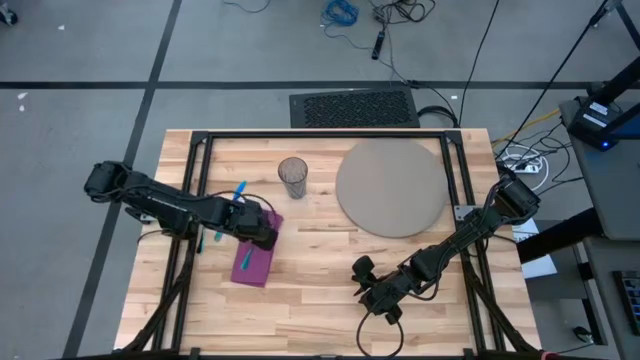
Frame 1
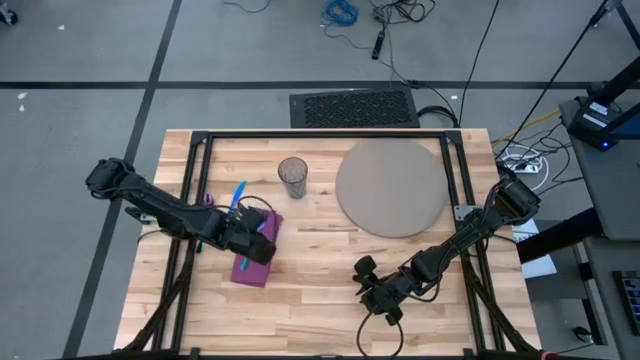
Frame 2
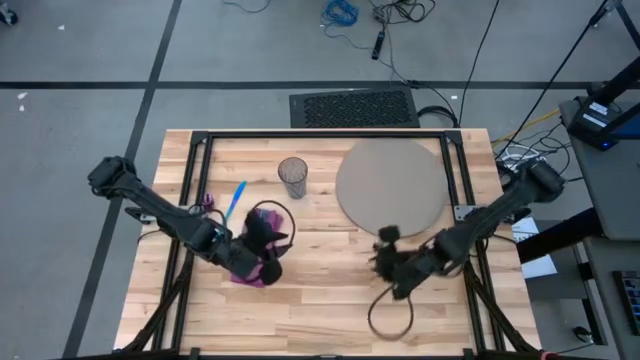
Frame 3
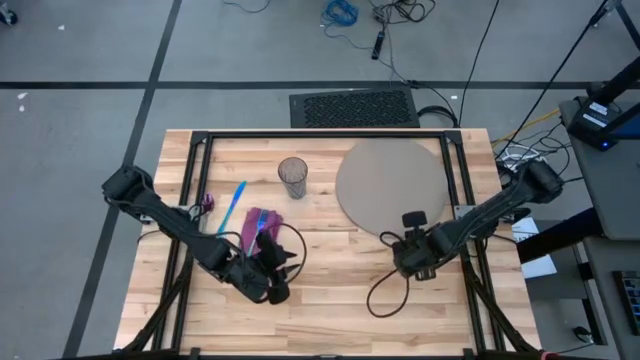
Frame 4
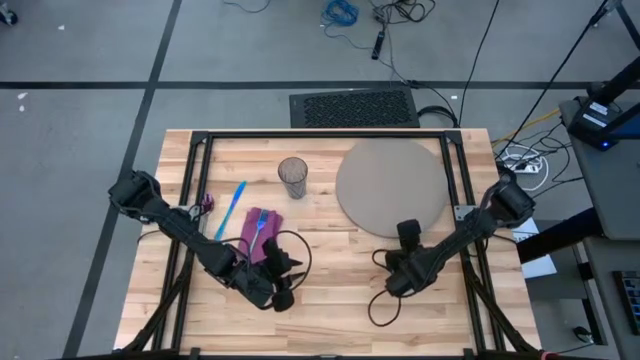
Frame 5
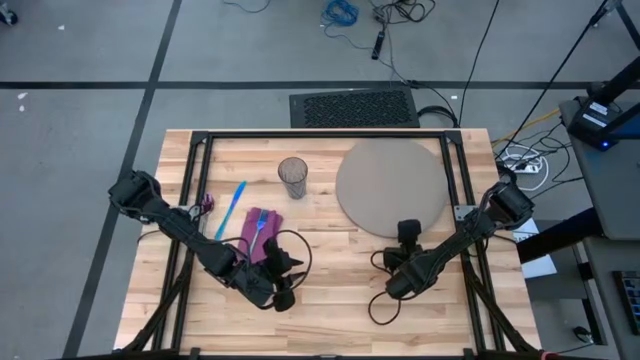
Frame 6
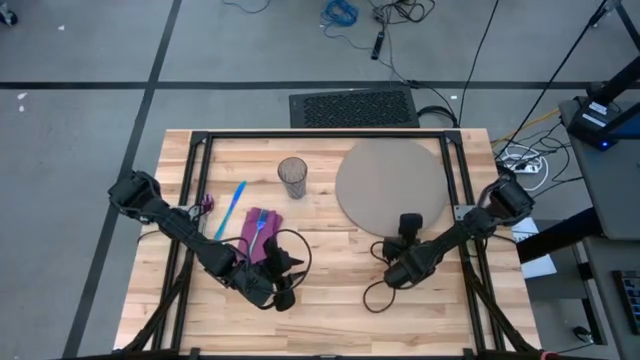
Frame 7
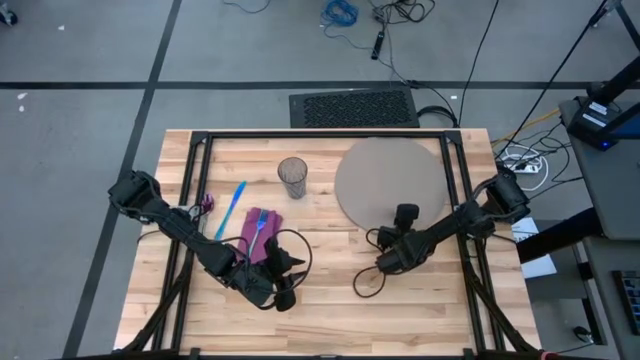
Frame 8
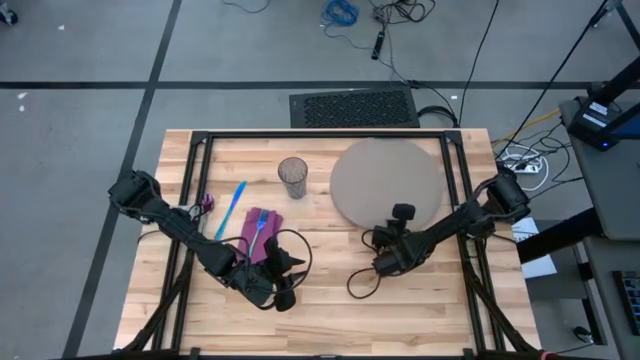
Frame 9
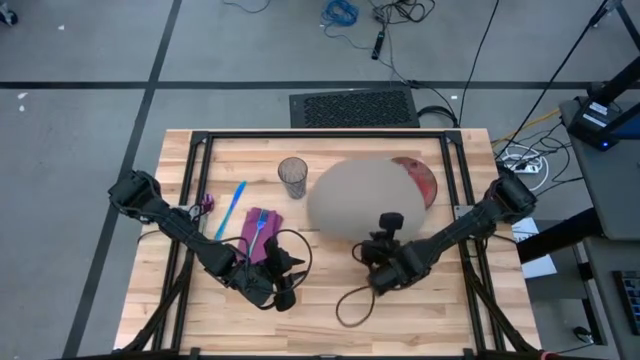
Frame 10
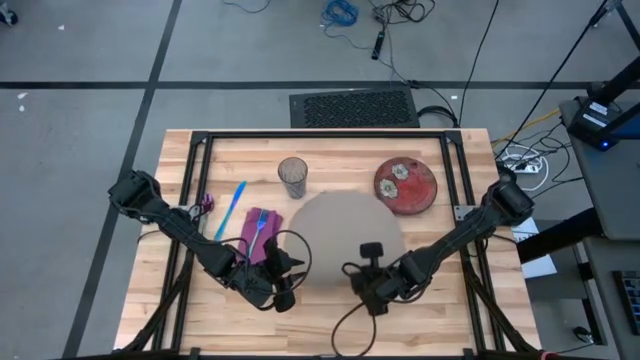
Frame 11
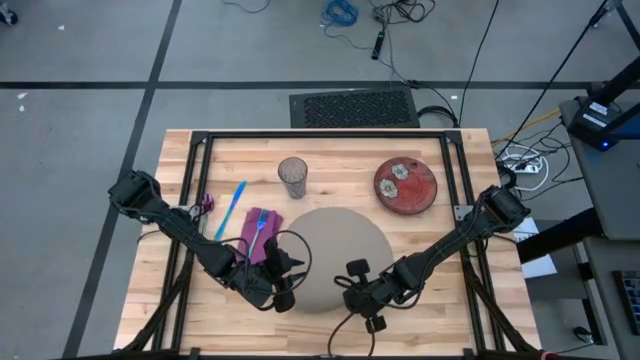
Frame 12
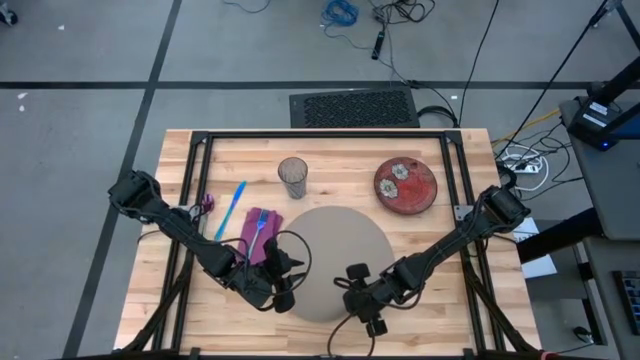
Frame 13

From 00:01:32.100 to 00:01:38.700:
Task: Set table place
Move the gray placemat to the center of the table

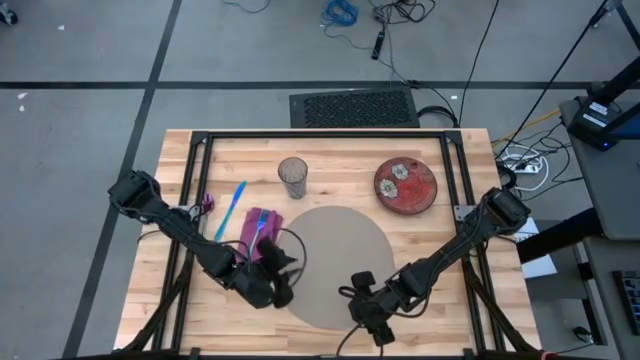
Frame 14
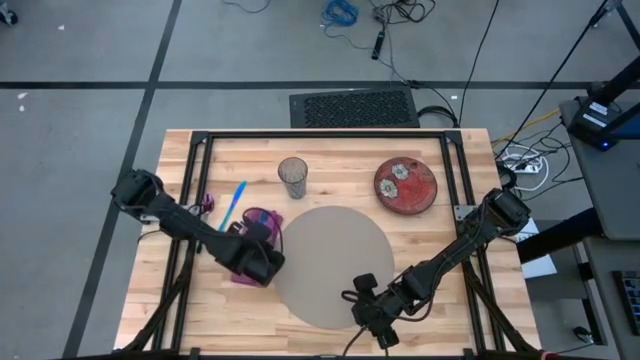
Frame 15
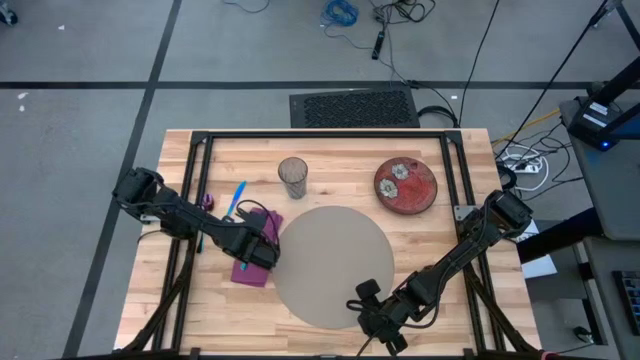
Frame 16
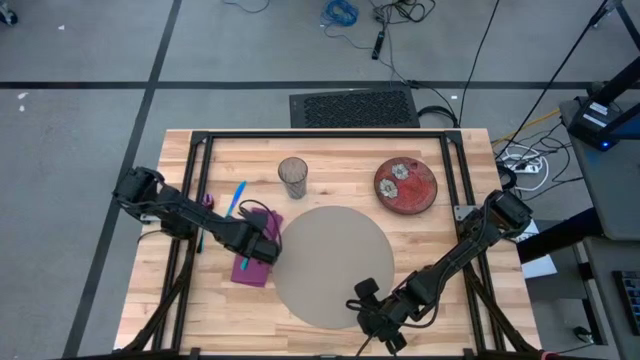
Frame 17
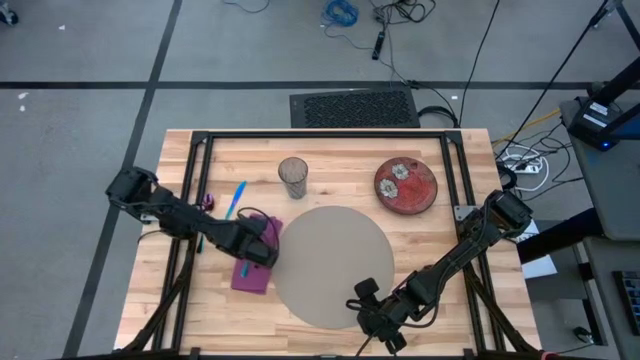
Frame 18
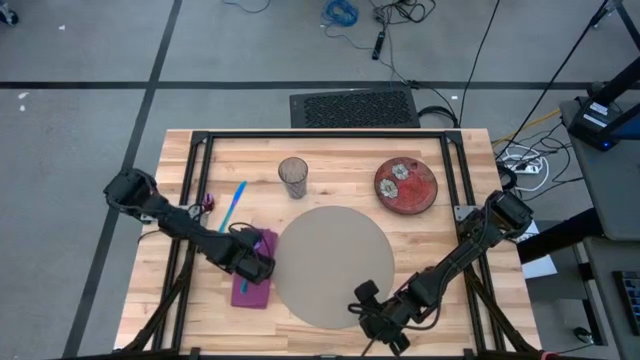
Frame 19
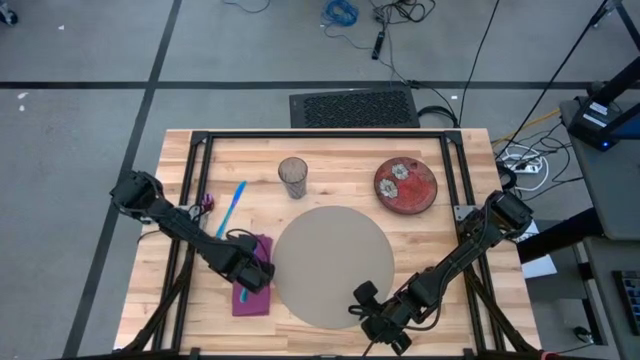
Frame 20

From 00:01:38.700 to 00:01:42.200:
Adjust the pink table napkin

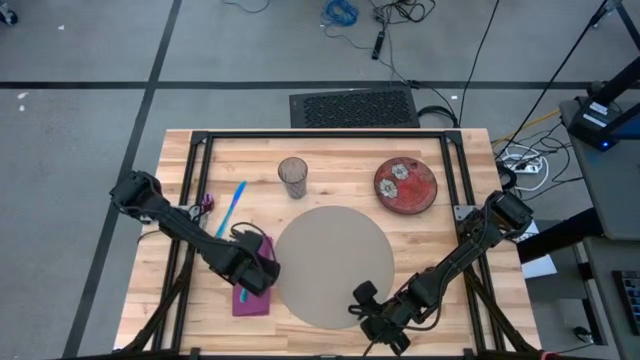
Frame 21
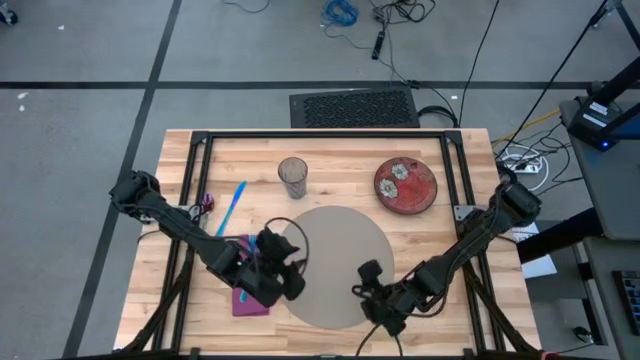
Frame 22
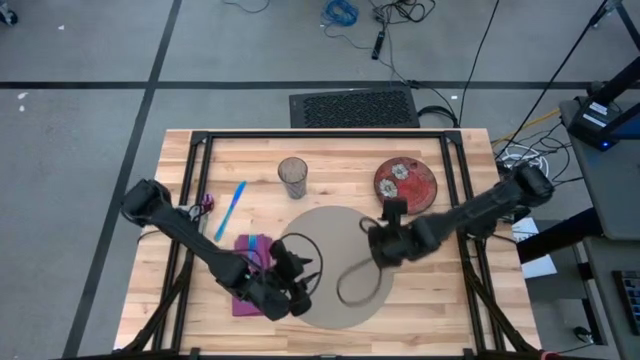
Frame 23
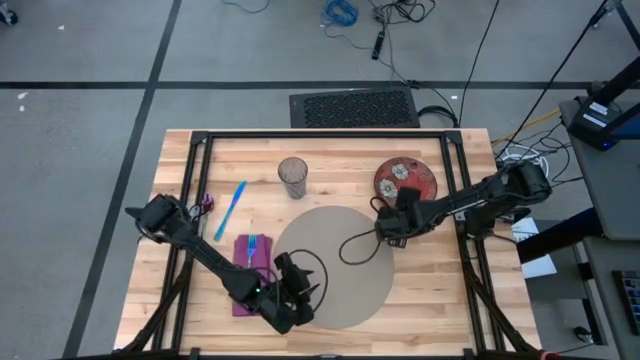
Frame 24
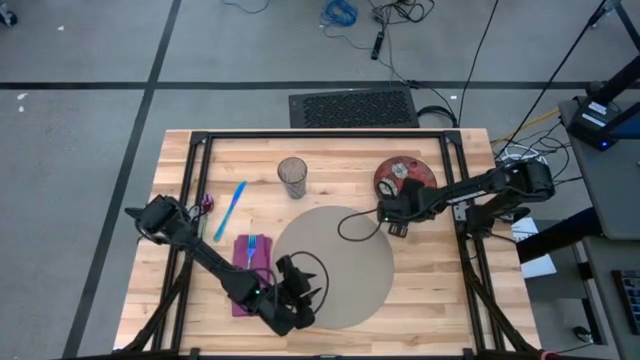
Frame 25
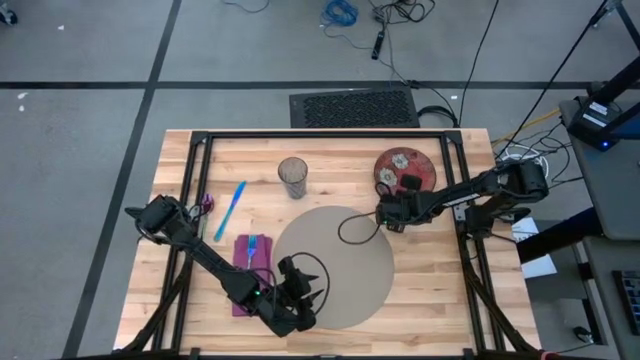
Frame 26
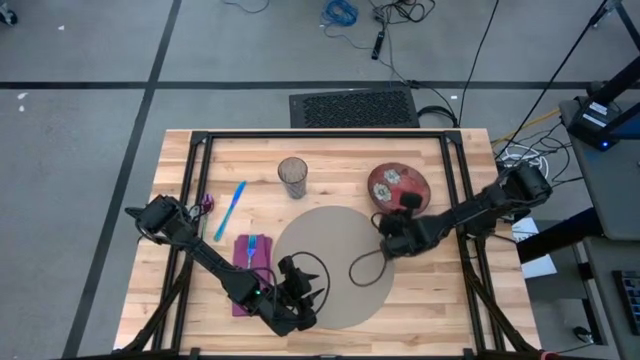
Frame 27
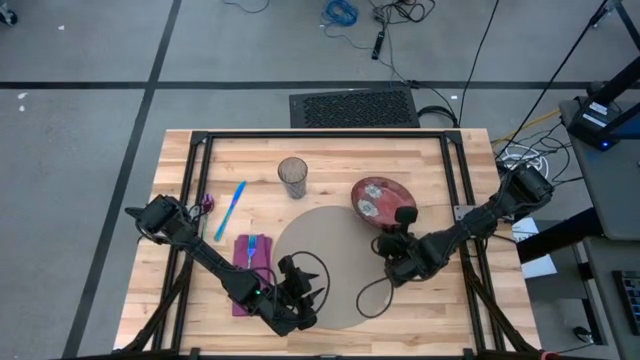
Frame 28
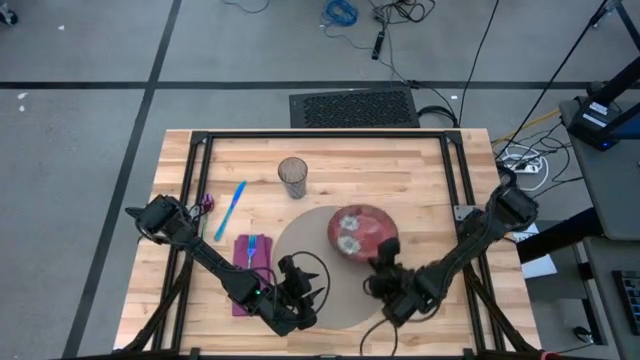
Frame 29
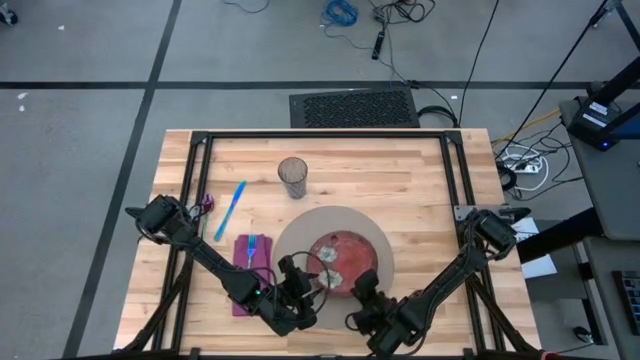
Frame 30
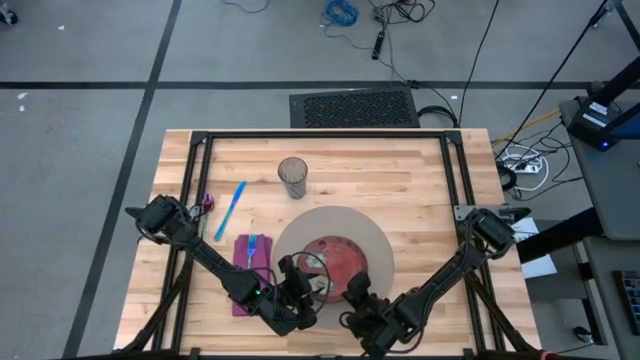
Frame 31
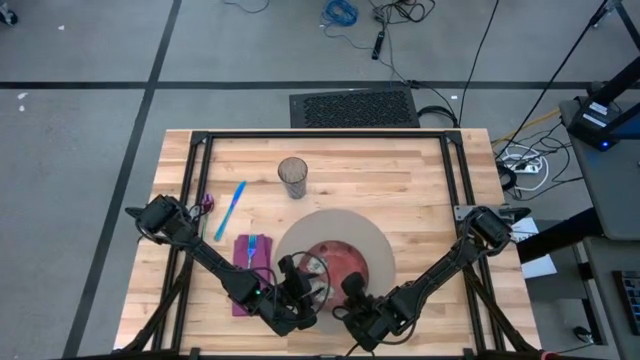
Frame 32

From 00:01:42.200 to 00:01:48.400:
Put the red plate on the gray placemat

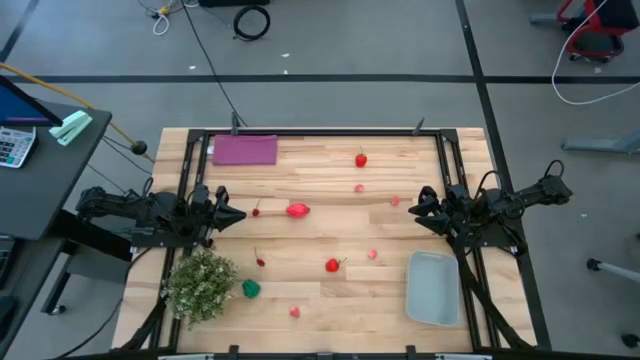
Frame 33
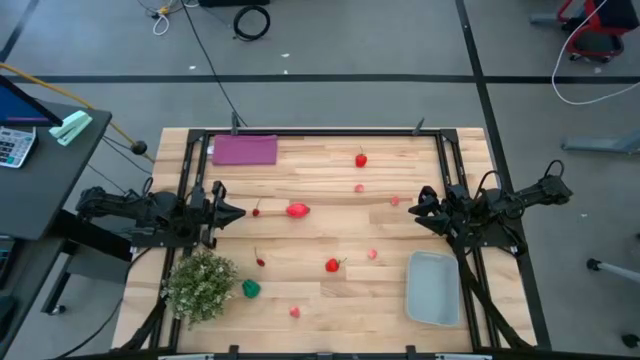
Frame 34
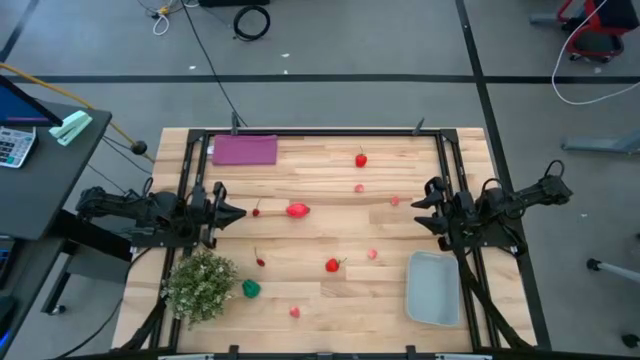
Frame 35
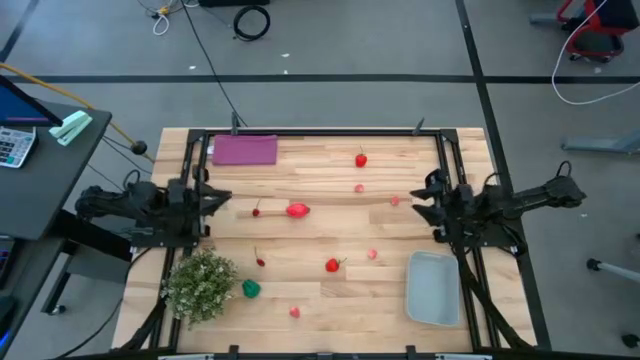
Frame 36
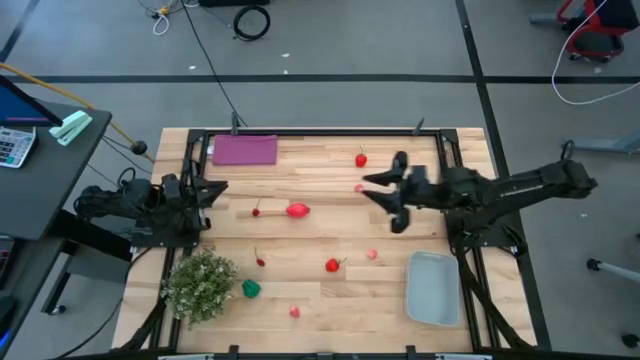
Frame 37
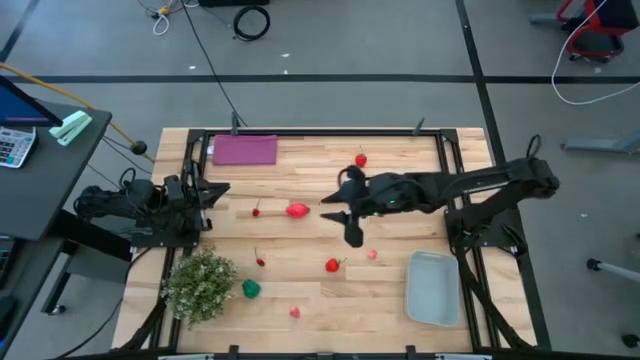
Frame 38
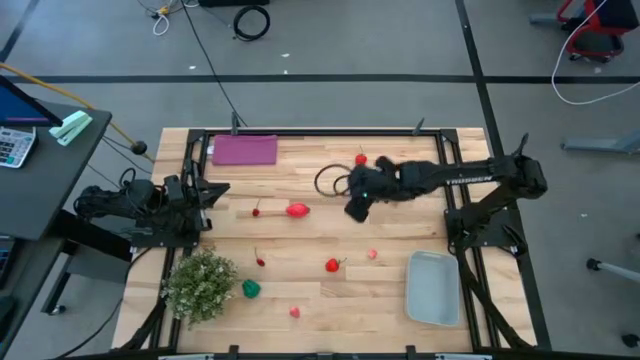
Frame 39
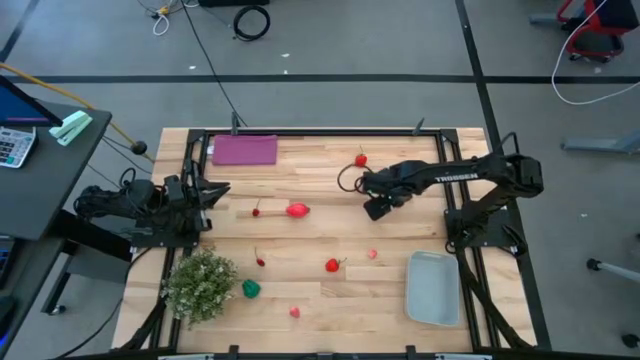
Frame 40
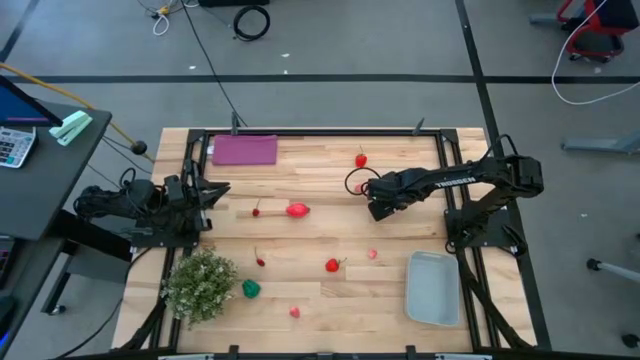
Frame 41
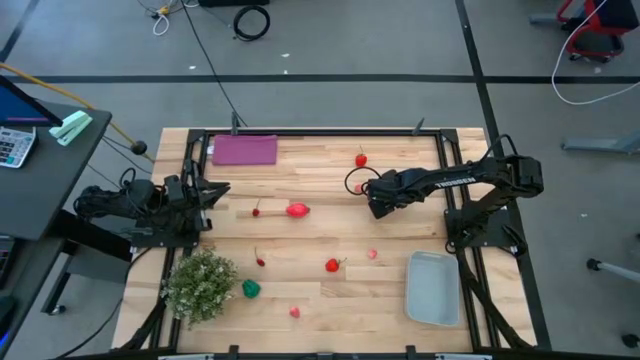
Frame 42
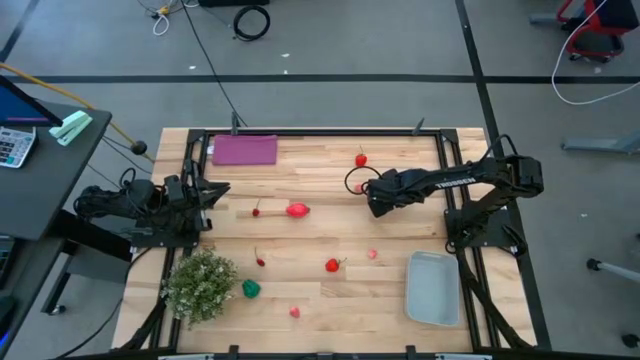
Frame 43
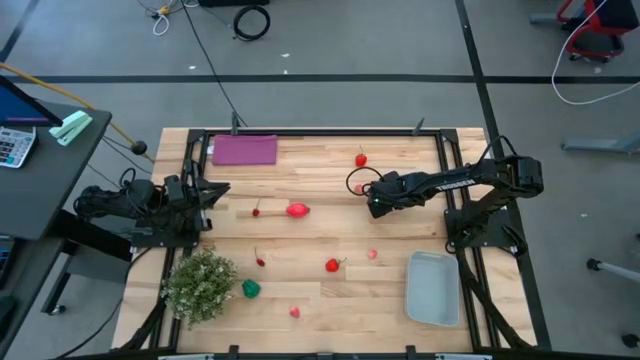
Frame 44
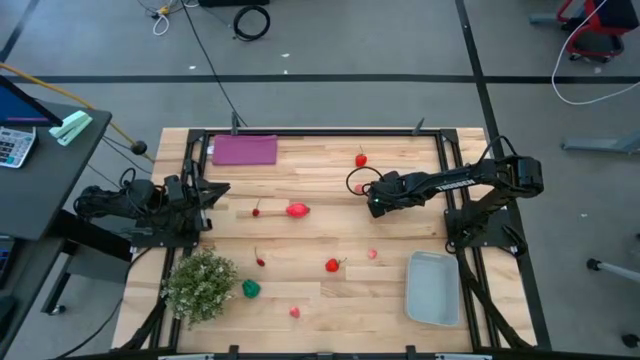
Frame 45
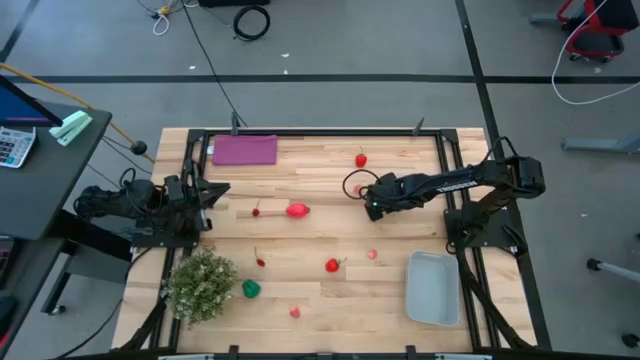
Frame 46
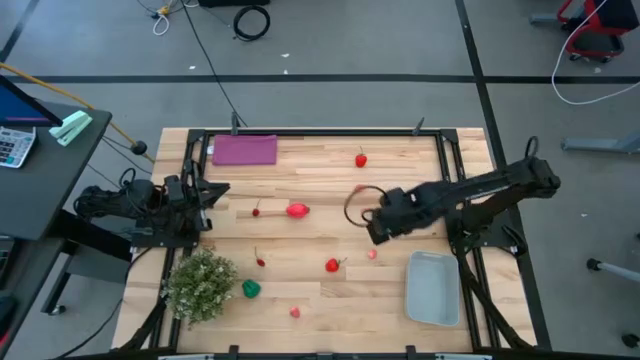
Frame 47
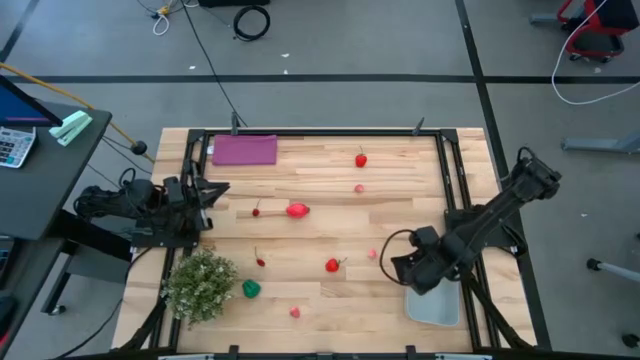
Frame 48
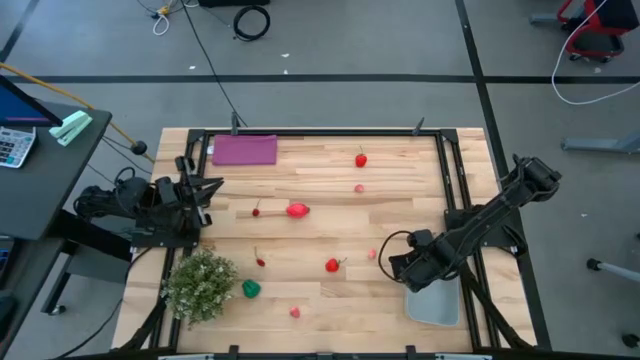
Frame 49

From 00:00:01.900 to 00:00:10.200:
Task: Pick and placing Produce into tupperware
Put the pink peach into the gray bin
